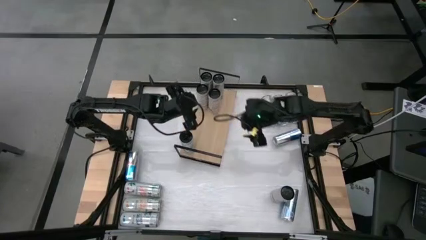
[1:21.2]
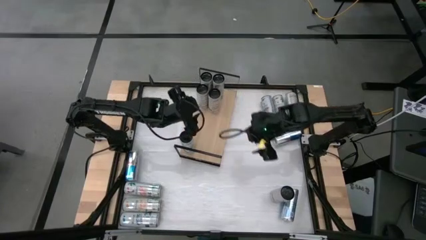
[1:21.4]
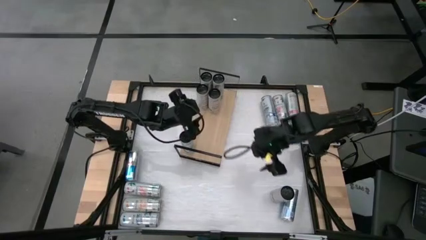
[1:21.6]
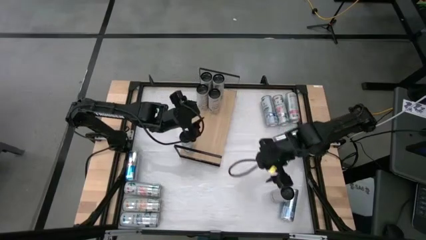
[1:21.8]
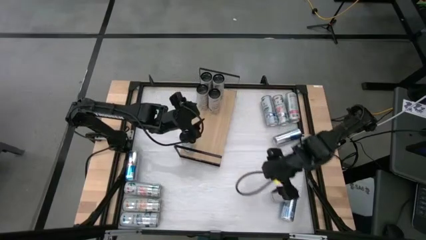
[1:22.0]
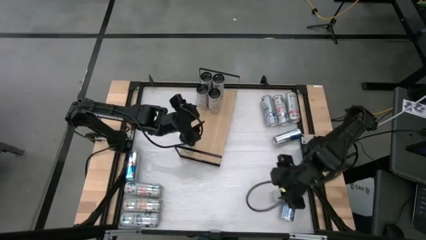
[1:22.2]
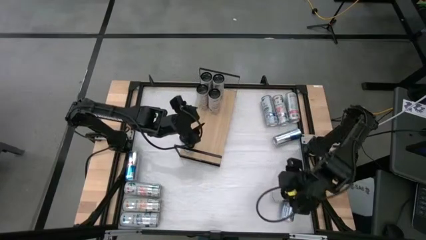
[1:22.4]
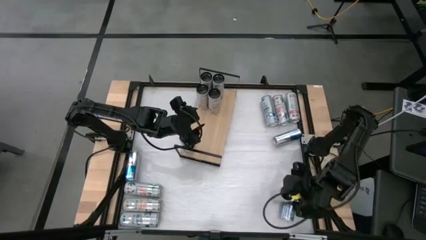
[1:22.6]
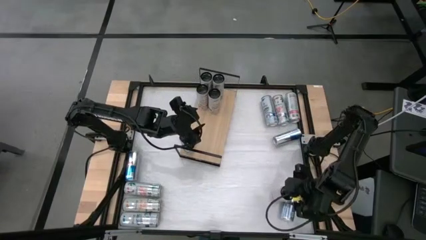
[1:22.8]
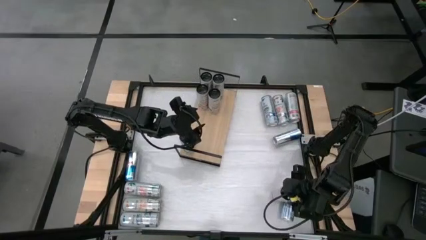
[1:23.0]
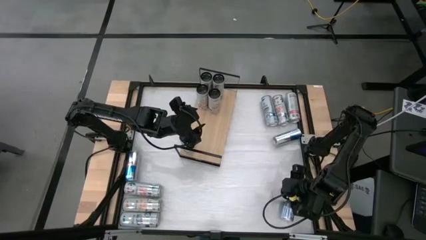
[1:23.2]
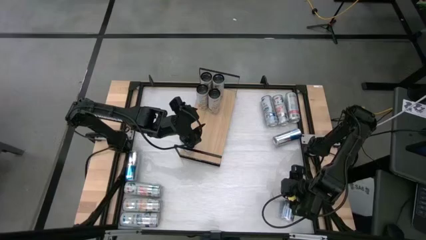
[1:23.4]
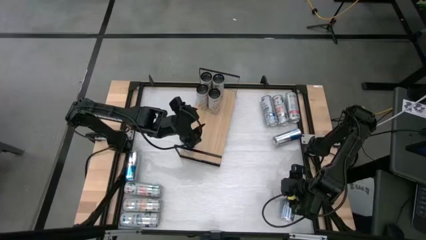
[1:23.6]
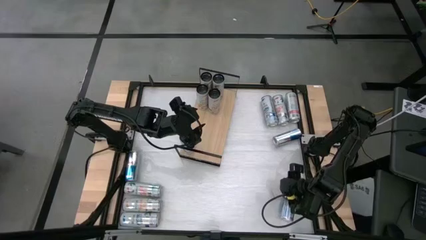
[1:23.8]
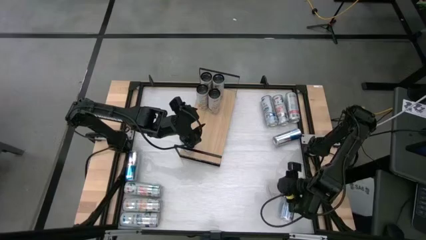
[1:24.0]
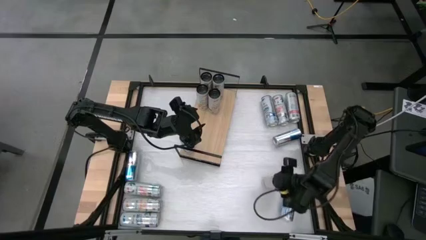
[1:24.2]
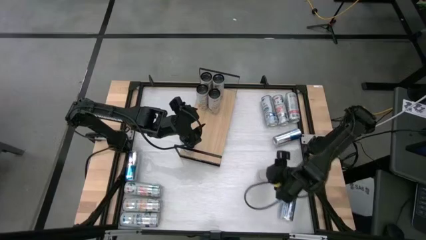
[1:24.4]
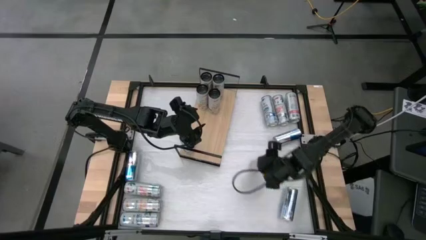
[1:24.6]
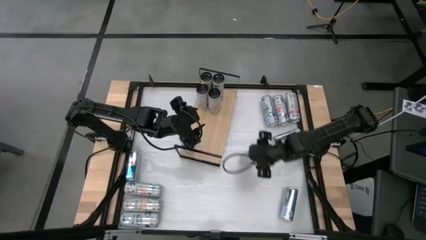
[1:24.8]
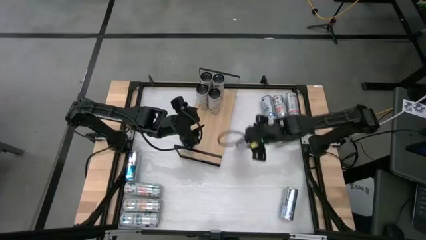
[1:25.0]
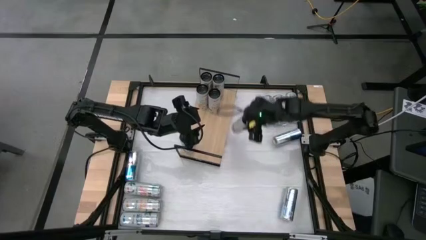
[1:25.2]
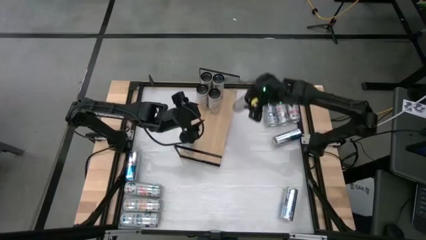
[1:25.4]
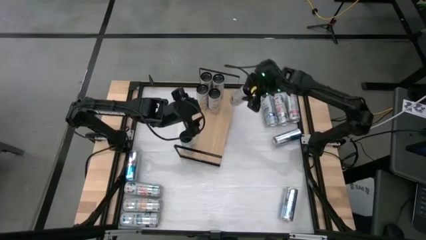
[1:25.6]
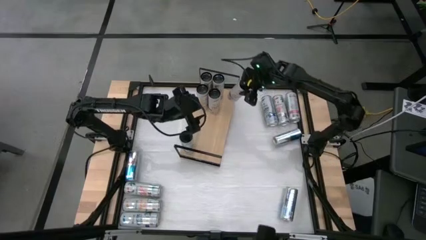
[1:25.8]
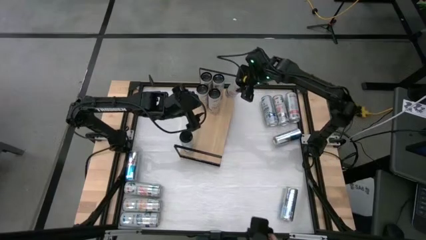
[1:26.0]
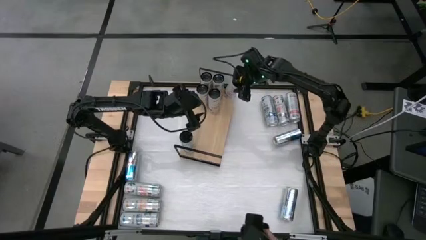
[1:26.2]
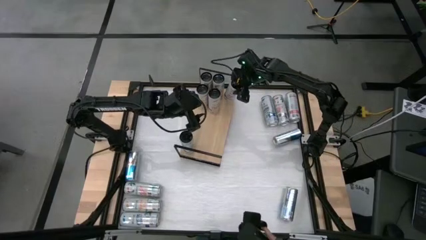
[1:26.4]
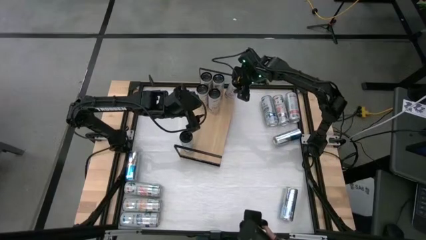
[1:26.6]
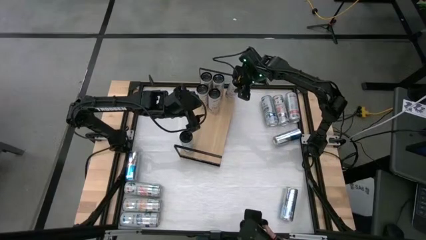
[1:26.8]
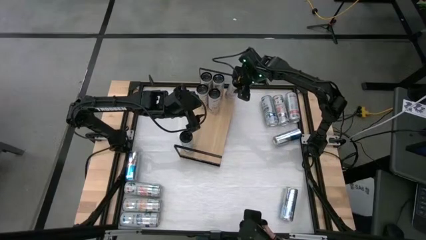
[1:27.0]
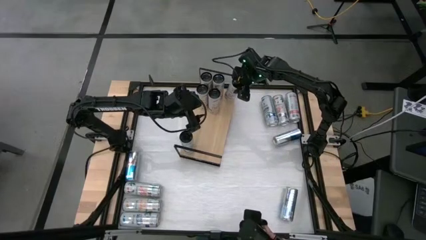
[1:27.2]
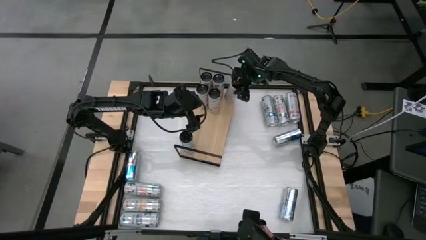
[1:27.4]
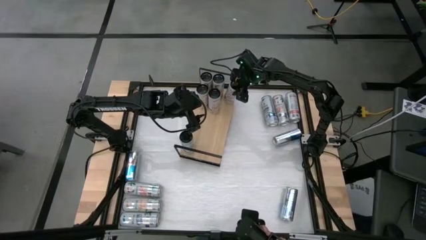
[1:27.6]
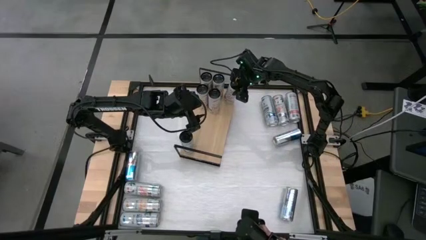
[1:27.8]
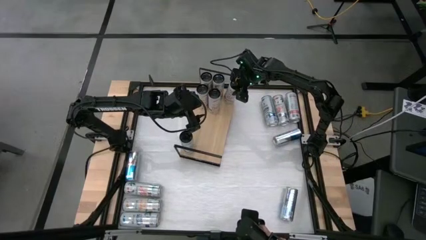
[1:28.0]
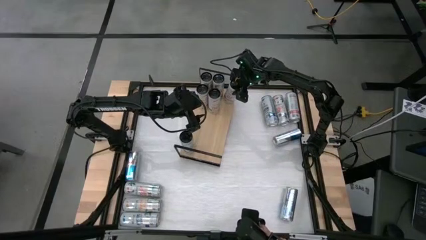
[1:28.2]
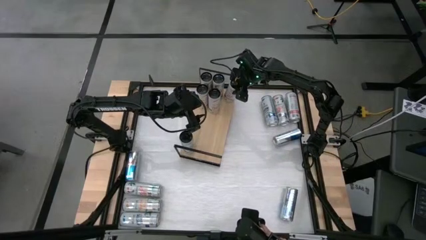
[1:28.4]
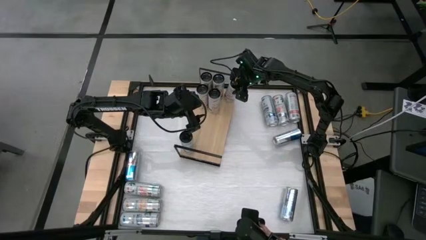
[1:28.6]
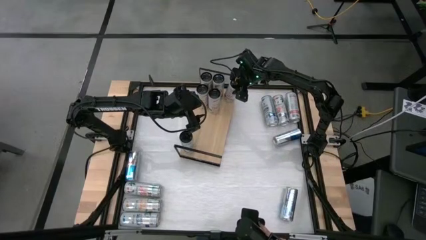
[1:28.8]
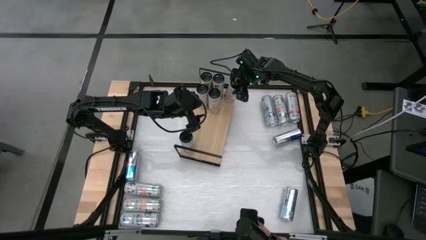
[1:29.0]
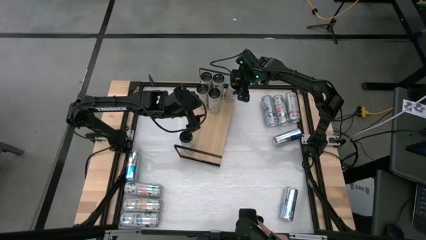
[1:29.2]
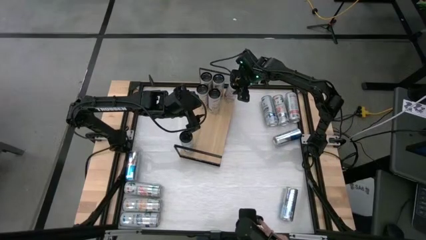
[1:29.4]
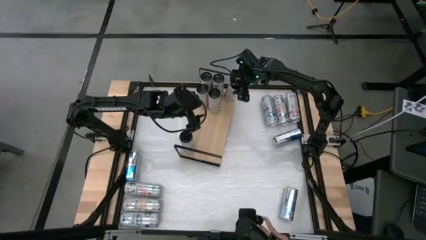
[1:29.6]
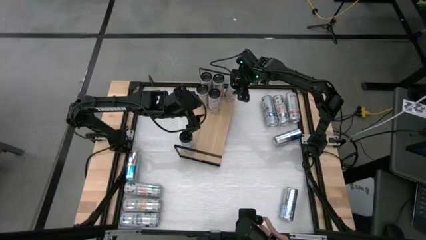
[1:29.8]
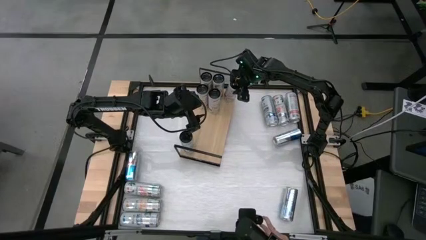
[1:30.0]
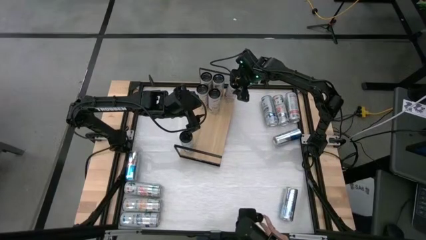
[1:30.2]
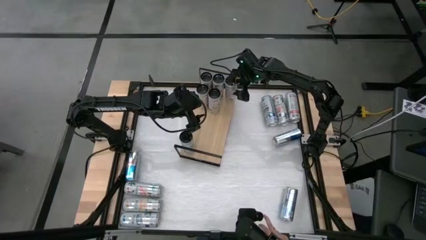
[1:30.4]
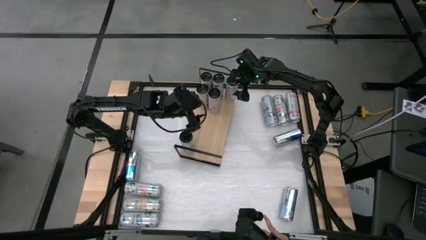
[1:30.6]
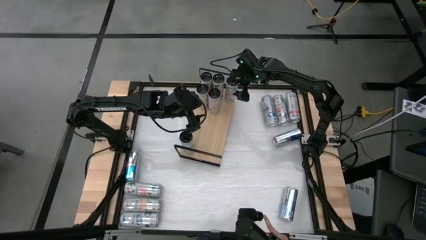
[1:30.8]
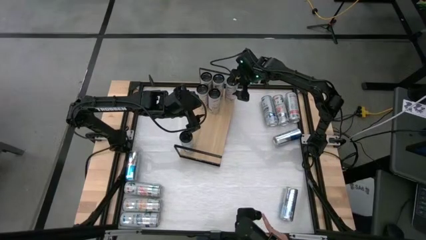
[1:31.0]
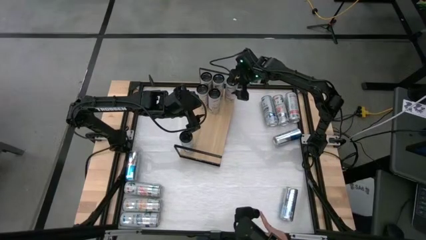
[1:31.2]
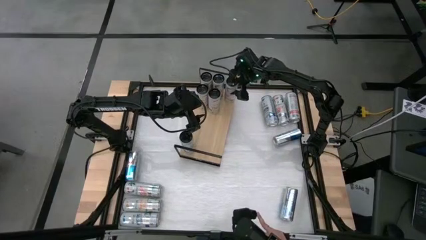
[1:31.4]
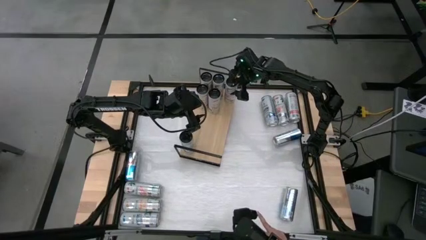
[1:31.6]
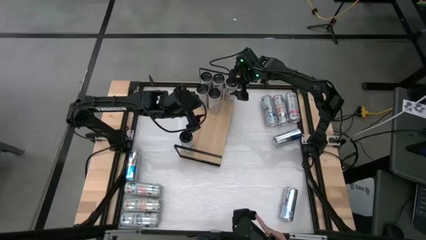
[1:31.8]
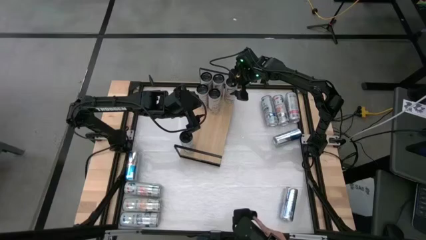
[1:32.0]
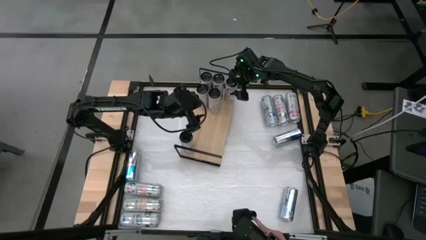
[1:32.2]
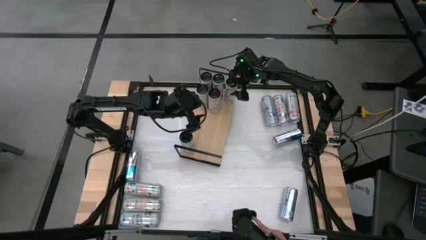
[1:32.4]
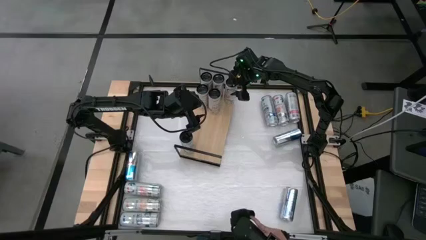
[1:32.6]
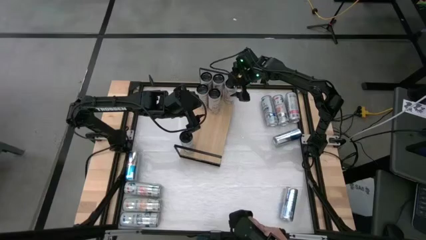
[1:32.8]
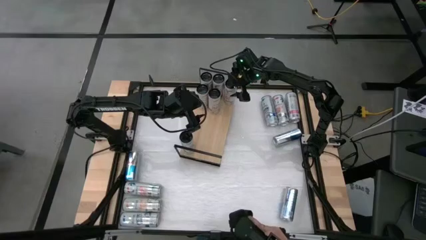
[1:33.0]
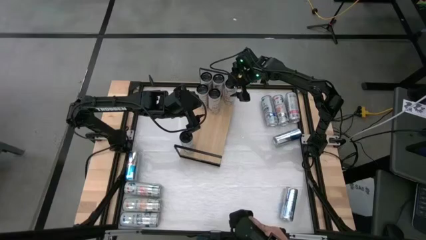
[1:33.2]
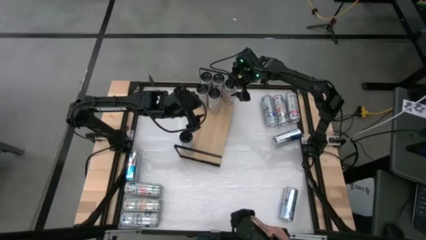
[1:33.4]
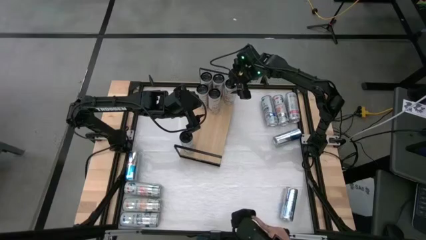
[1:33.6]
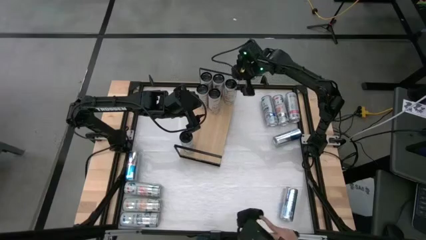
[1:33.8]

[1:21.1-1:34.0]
Task: Place canned beverage on shelf
Put the bottom right pink soda can on the shelf aligned with the other pink soda can

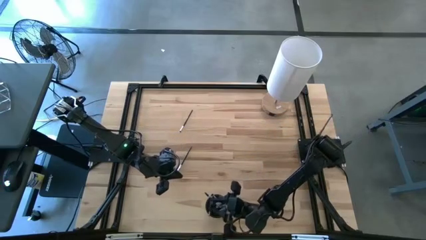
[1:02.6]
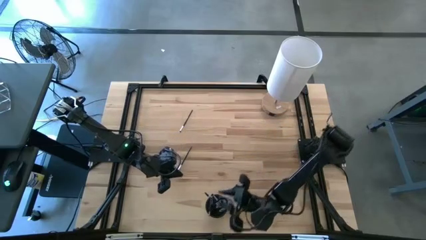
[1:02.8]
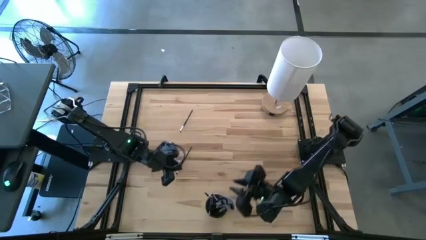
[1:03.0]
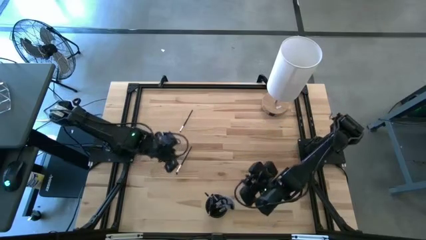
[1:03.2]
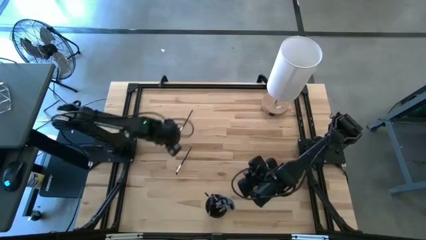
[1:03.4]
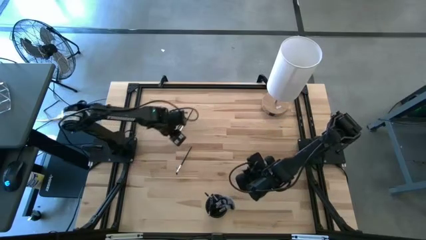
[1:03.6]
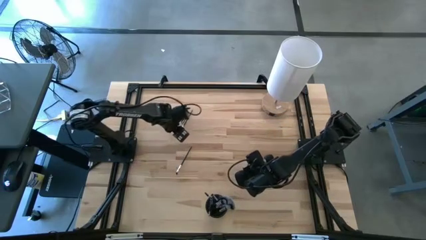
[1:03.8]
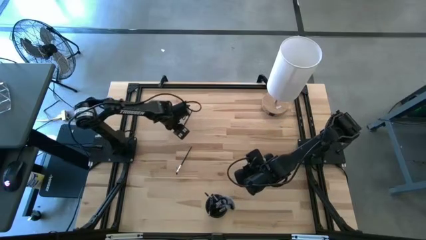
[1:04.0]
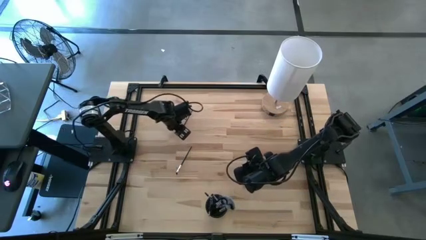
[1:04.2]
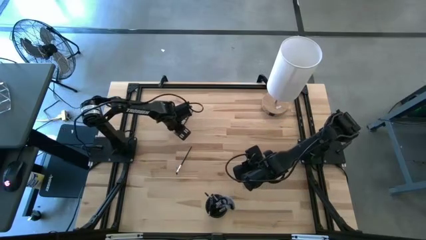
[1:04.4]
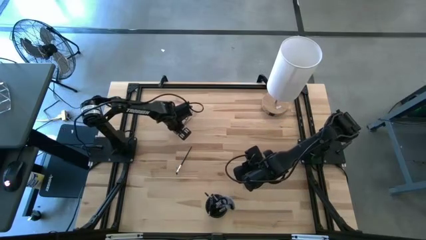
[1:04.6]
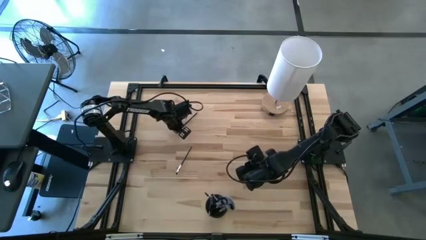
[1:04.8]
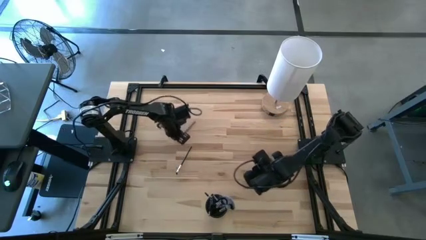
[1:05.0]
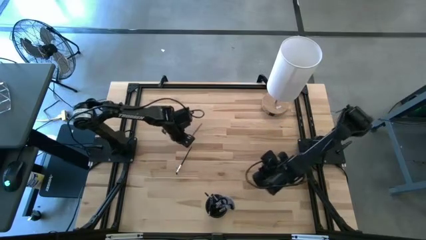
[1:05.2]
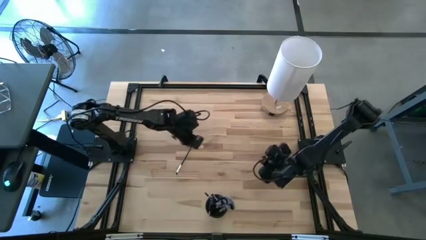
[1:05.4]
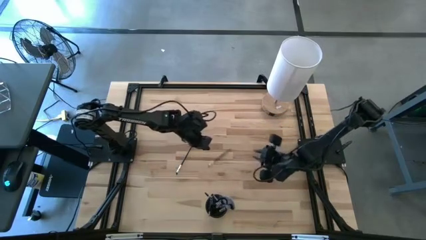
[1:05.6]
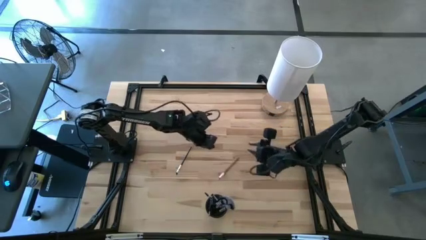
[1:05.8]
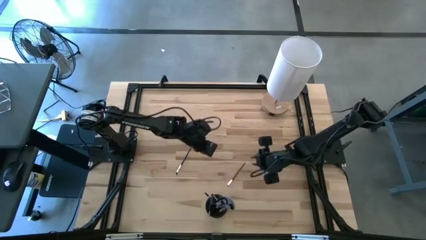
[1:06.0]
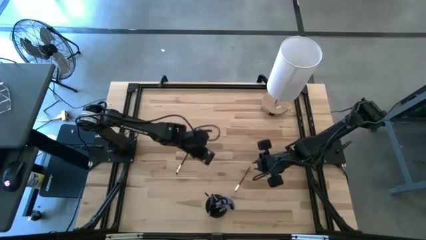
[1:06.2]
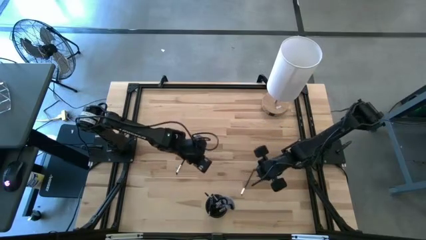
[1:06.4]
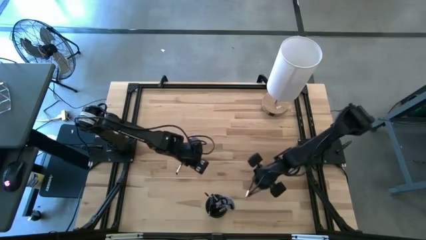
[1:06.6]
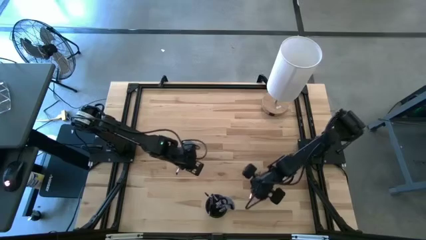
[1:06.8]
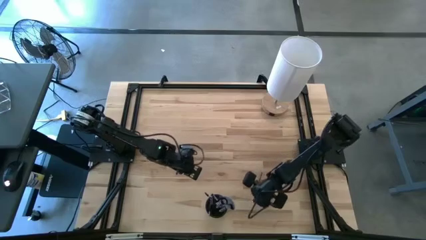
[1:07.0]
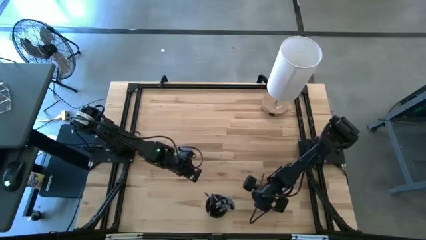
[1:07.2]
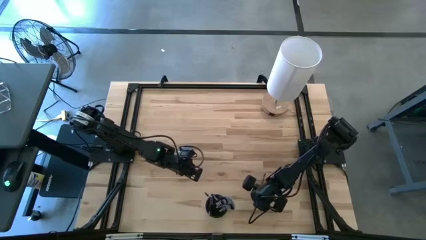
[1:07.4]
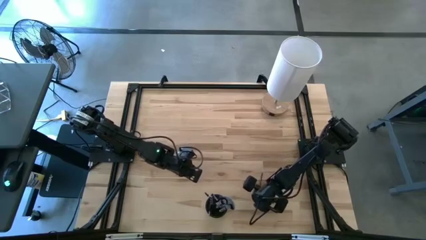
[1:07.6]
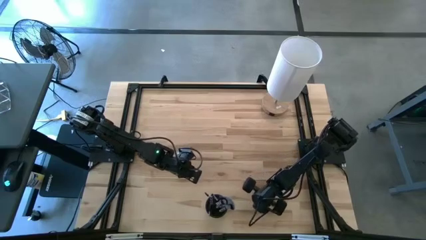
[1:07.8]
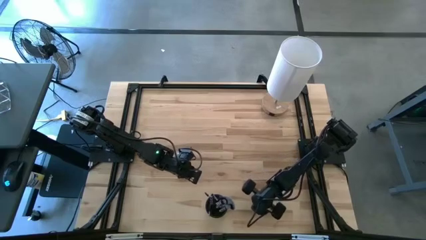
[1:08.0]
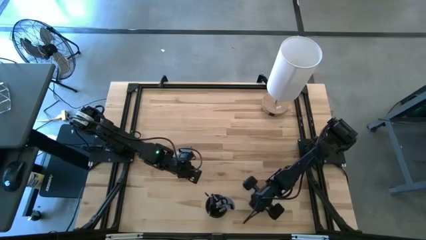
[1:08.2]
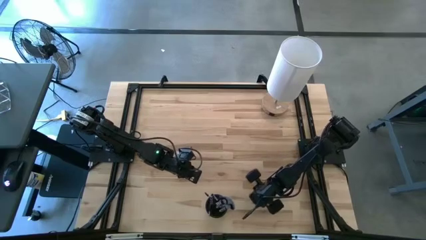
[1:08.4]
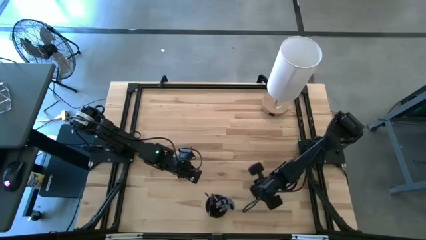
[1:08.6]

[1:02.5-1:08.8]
Task: Put items in baskets/containers
Put the black eyeshadow brush into the black pen holder
